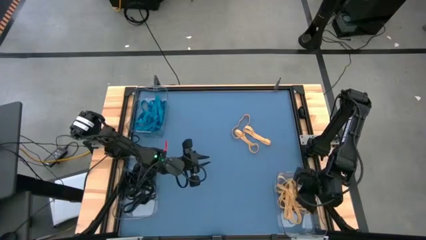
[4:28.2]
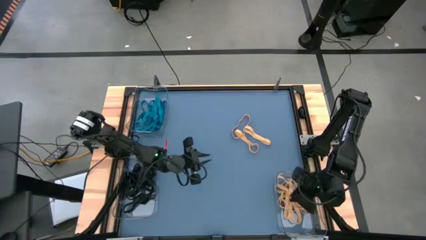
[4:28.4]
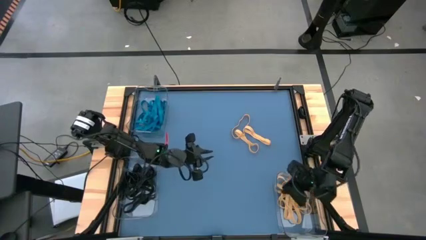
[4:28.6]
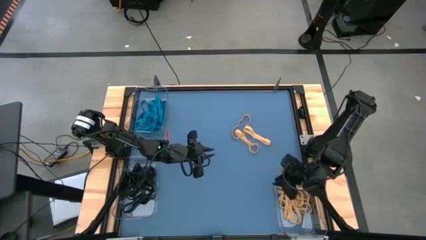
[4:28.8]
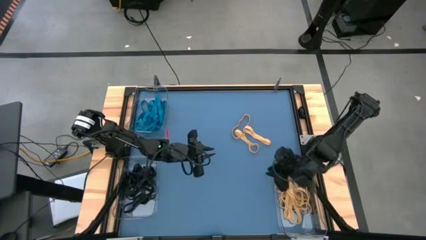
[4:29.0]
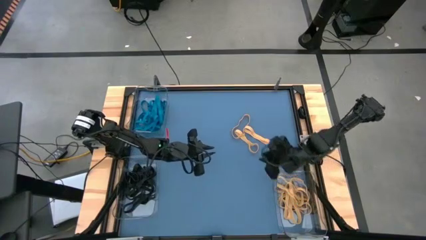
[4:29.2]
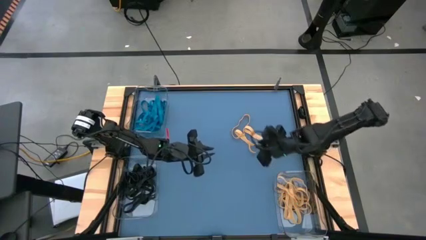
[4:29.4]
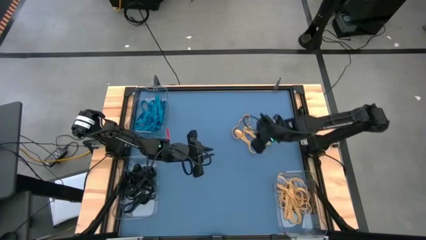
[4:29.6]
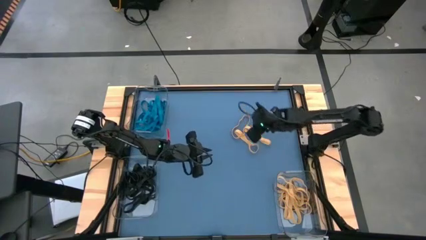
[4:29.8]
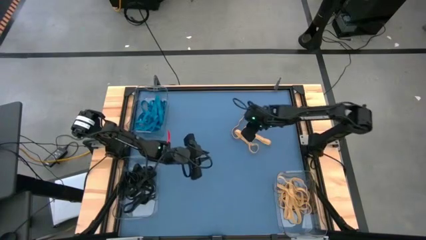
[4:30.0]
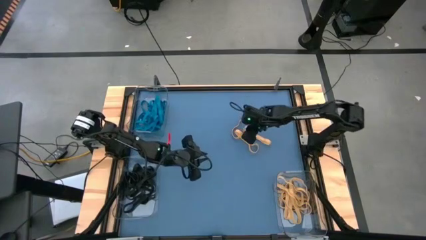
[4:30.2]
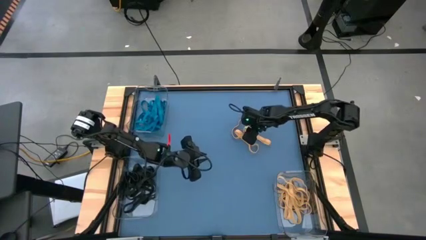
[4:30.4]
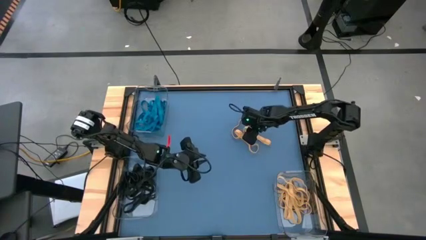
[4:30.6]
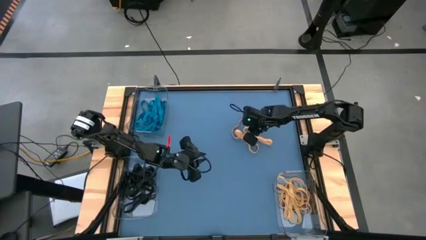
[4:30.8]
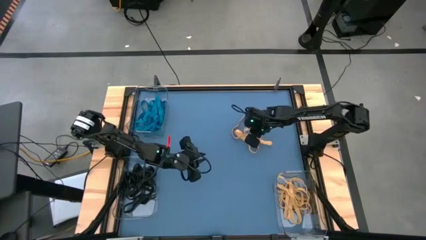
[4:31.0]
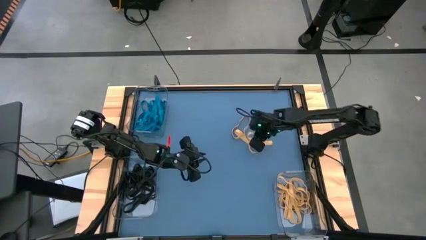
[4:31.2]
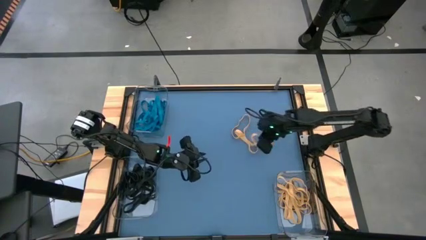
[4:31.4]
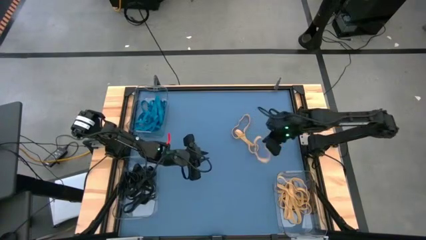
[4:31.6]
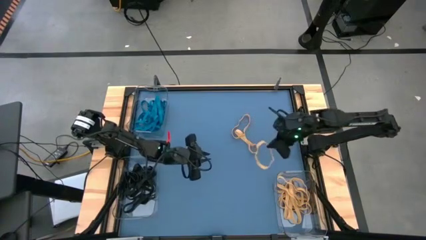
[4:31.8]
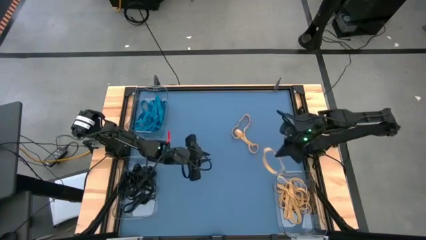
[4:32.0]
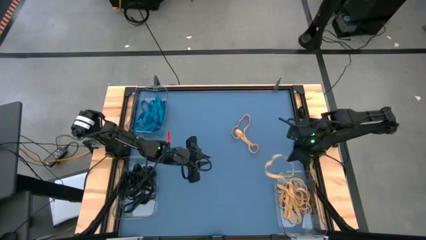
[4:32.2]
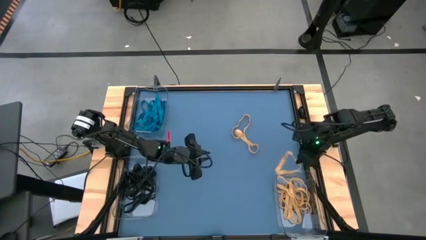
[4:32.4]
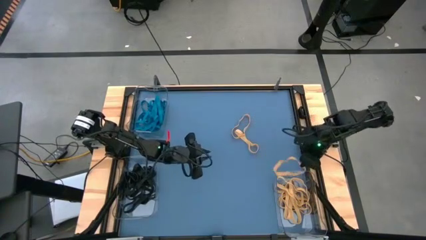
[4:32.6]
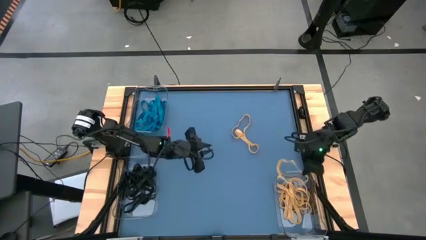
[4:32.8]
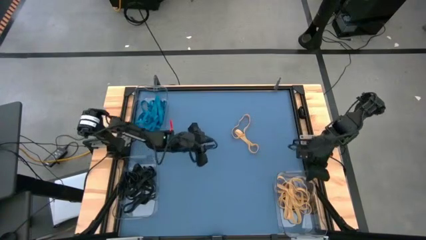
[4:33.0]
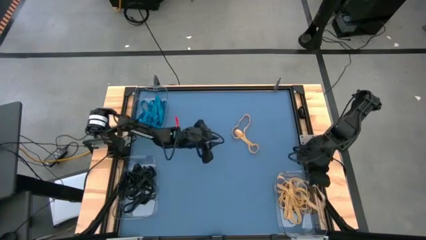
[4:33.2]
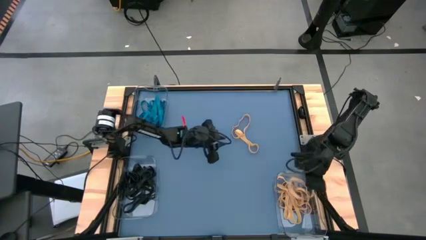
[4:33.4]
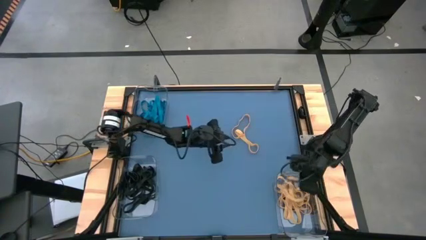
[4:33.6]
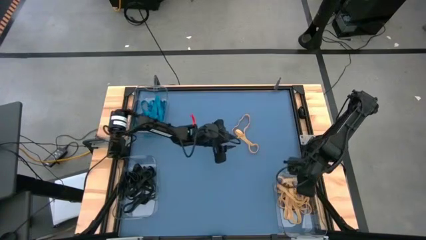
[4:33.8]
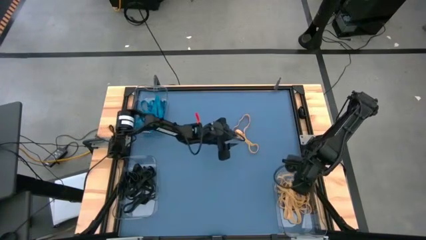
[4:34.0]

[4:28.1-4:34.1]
Task: Sort rubber bands into baskets
Put the yellow rubber band into the bottom right transparent bin

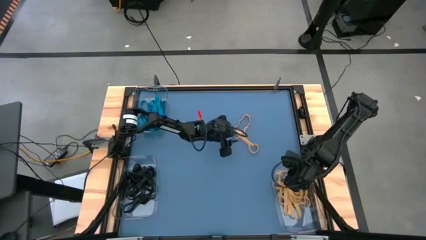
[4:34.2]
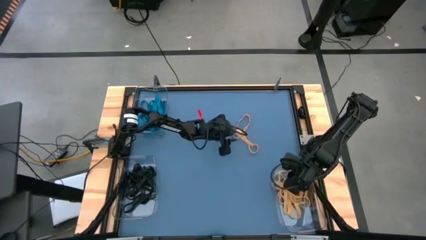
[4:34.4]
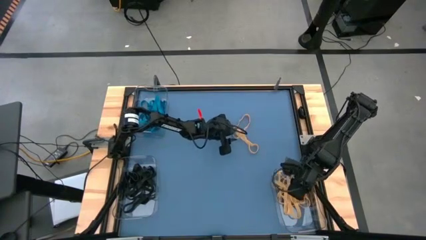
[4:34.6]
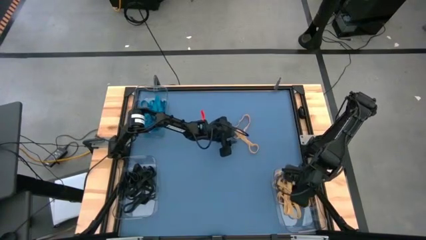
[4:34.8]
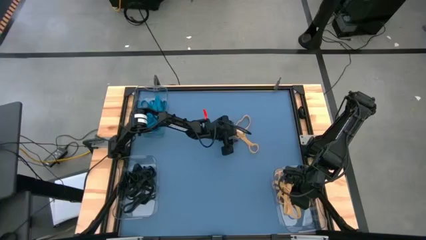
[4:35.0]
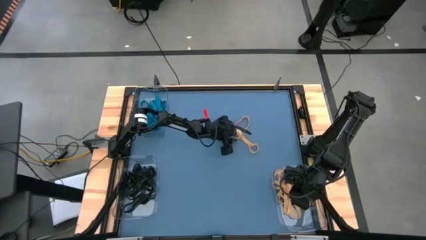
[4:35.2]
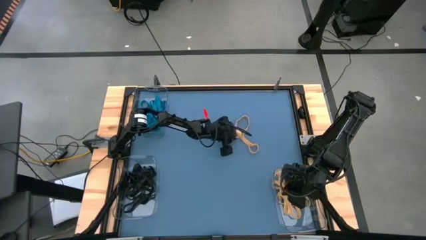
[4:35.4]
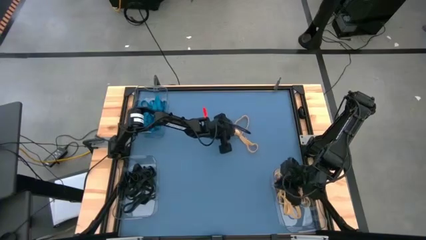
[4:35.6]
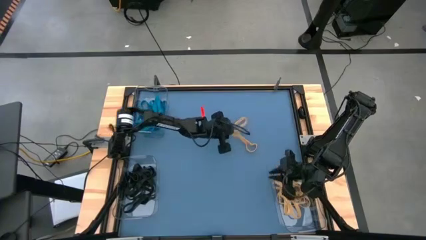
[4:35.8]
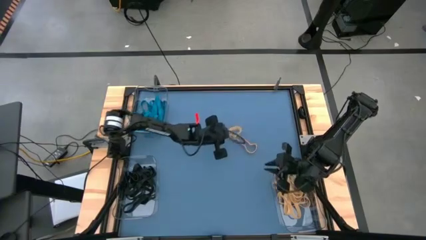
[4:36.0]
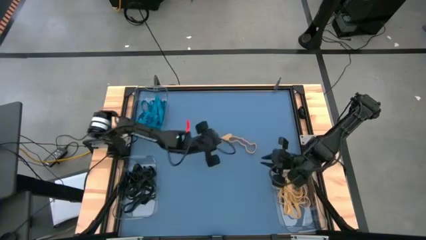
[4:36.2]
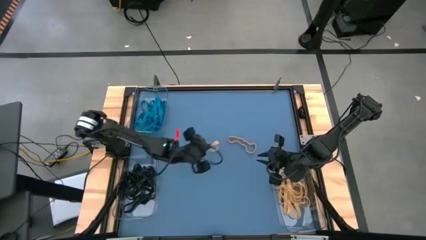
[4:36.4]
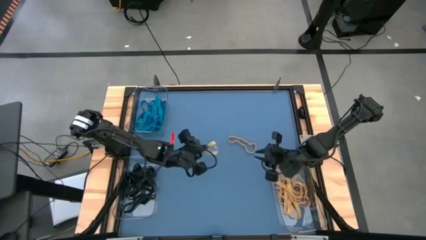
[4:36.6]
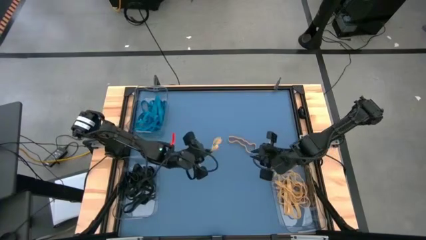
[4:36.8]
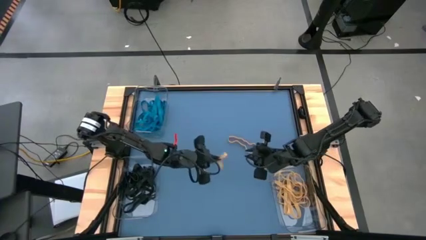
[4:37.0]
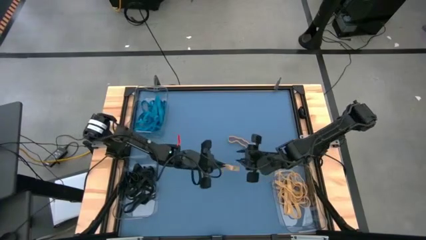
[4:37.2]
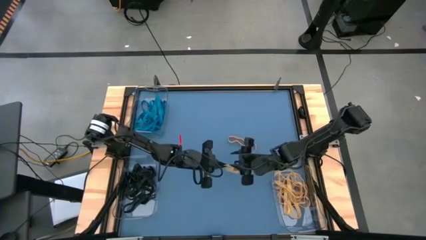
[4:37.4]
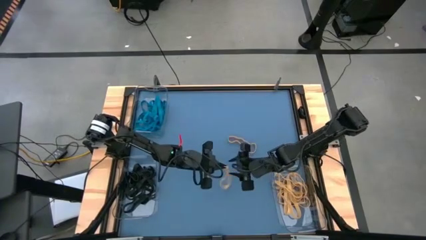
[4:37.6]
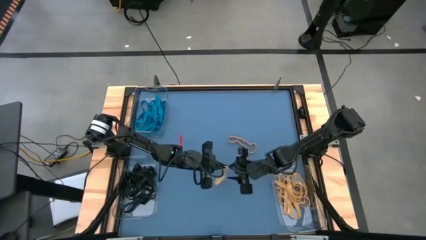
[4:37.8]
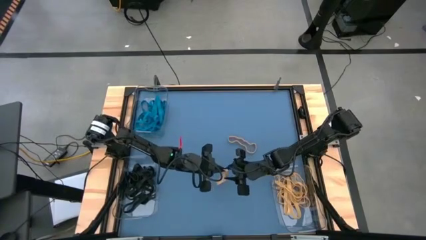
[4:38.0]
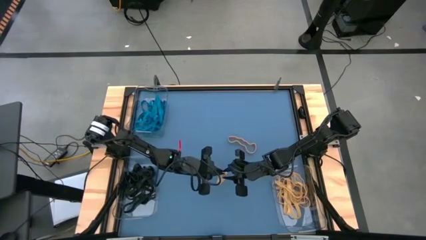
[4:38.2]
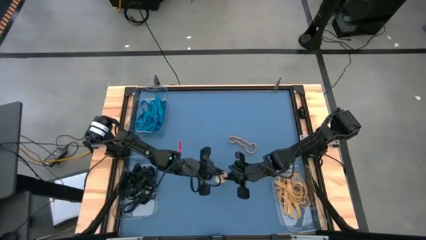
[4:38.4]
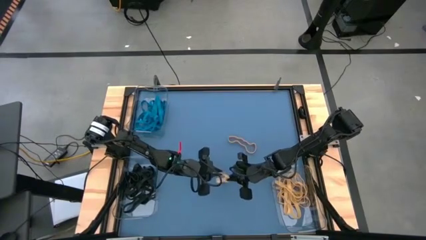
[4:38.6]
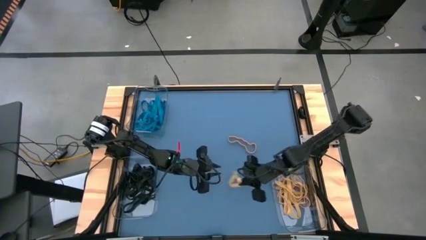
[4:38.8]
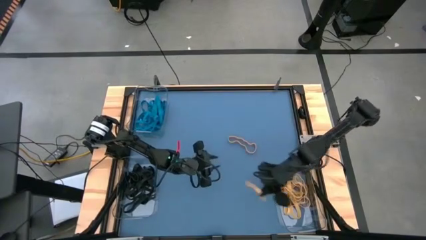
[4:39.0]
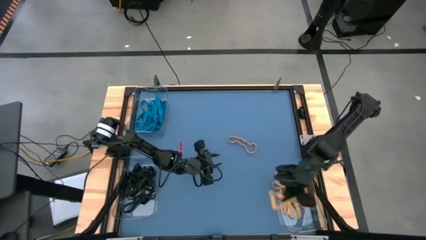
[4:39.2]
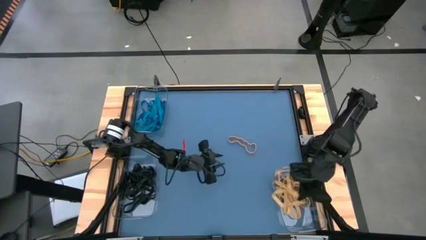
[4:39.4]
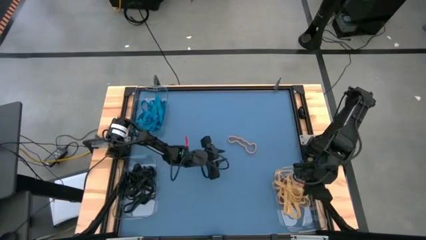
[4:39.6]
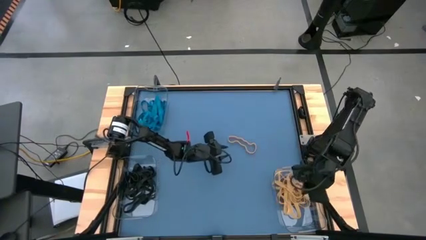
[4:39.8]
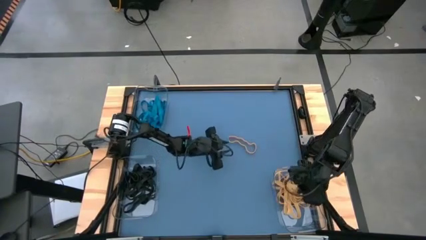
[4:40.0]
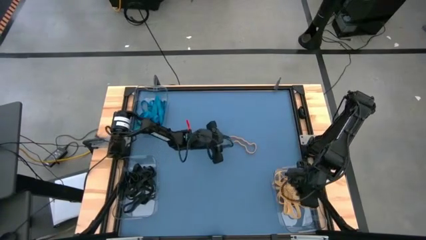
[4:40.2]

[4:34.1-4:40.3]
Put the yellow rubber band into the bottom right transparent bin

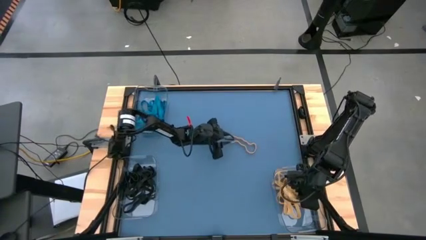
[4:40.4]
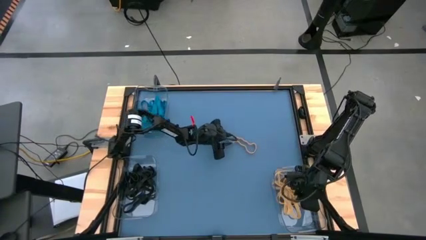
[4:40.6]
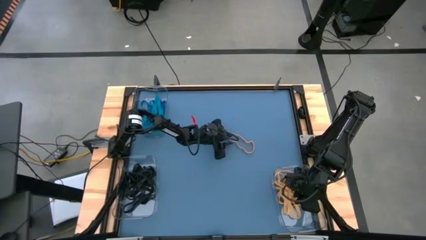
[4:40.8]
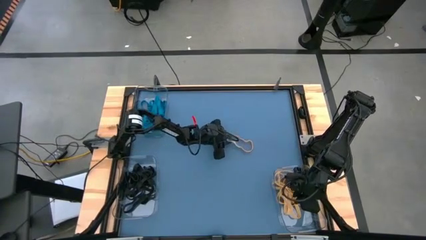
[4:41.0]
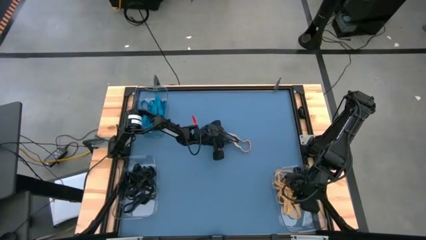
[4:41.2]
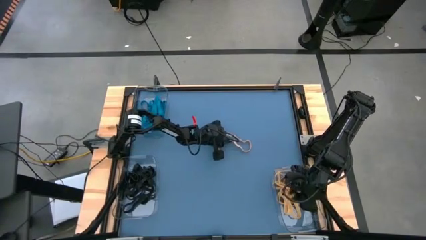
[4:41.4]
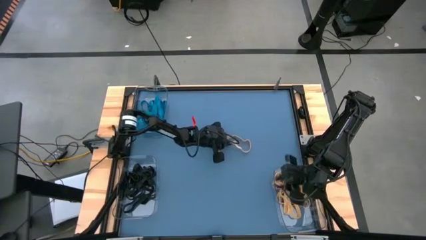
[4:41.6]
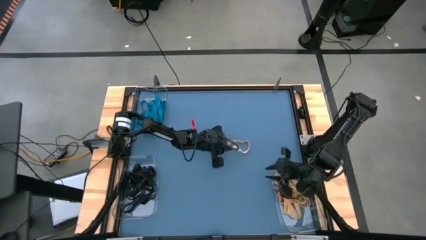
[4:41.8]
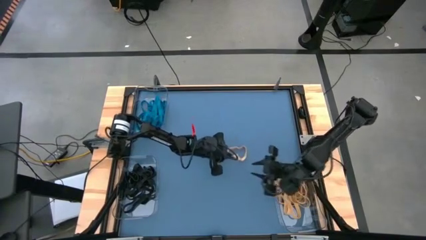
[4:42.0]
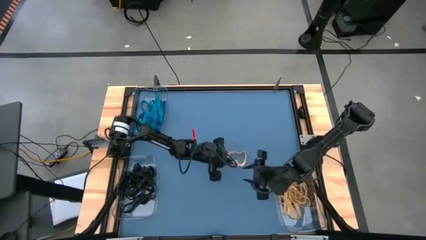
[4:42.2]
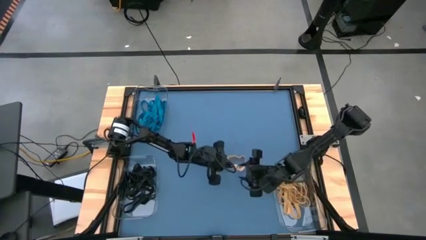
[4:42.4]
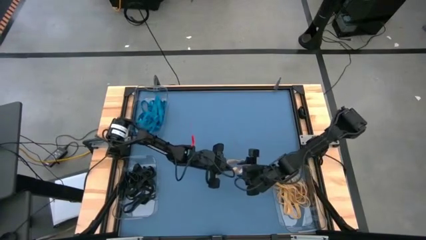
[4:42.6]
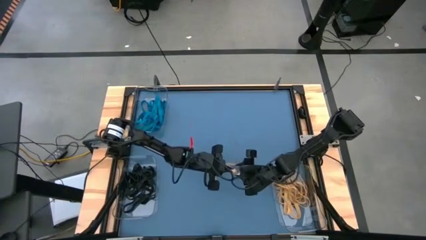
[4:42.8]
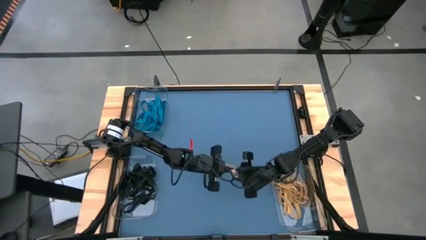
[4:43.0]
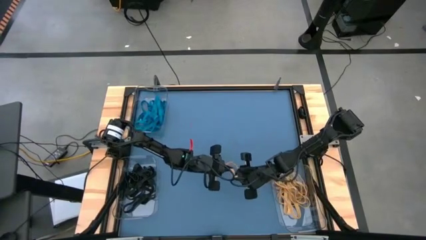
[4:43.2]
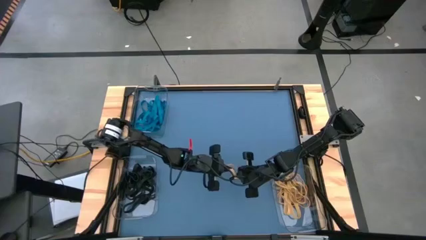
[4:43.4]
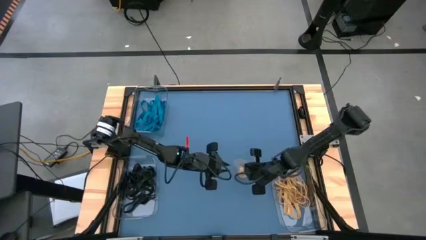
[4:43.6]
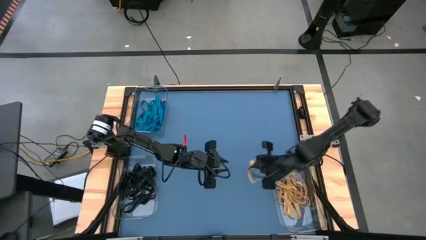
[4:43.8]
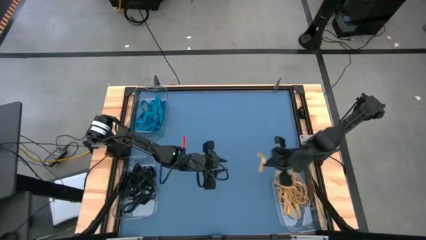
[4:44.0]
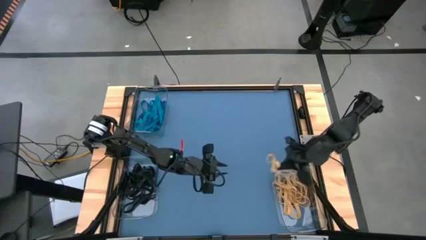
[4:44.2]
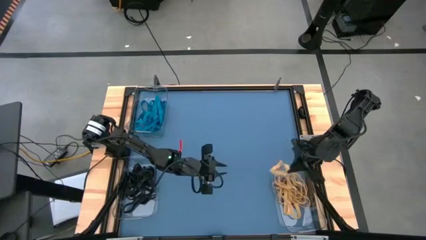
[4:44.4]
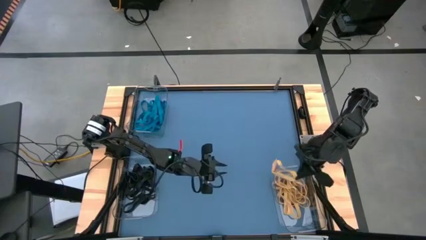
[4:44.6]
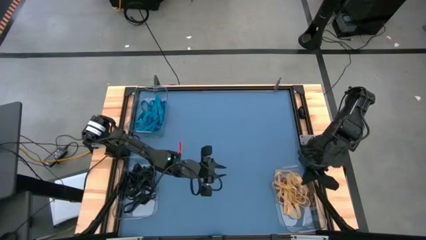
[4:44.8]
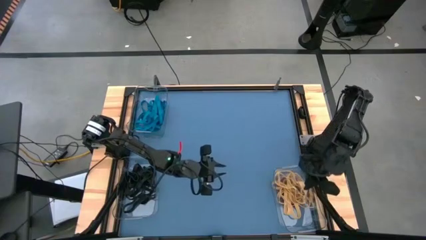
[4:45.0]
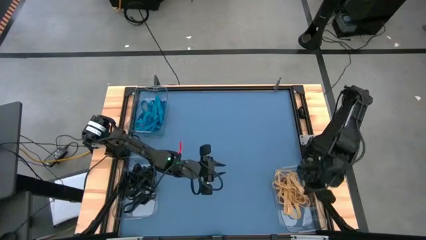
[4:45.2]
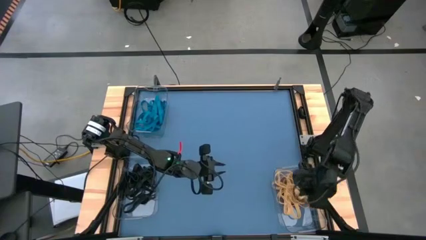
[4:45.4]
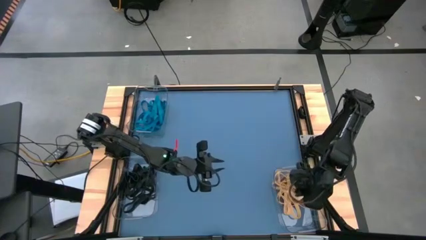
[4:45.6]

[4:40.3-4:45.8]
Put the yellow rubber band into the bottom right transparent bin
